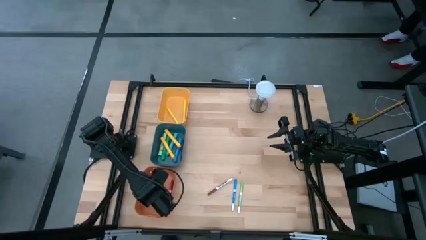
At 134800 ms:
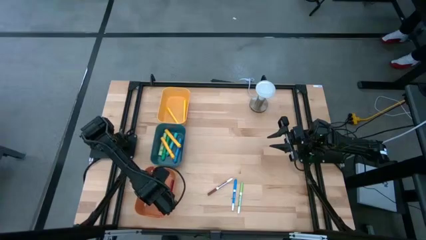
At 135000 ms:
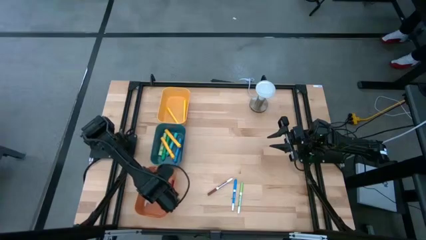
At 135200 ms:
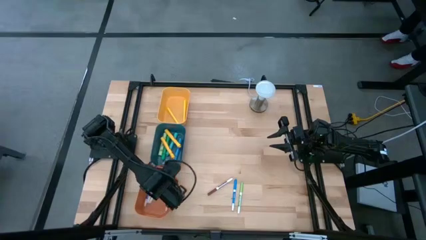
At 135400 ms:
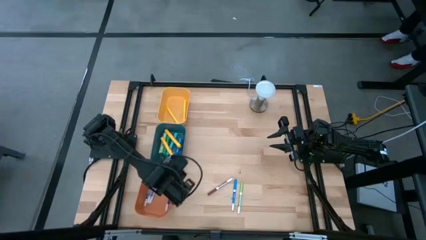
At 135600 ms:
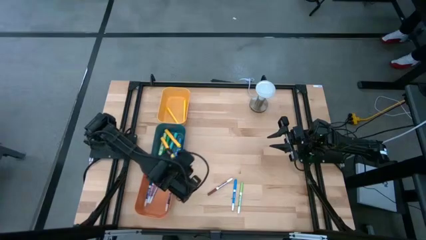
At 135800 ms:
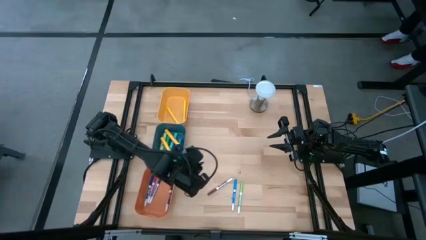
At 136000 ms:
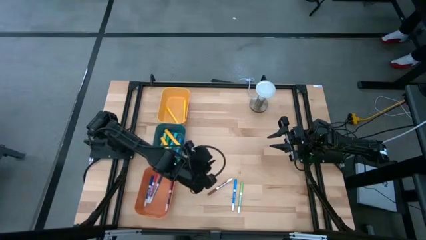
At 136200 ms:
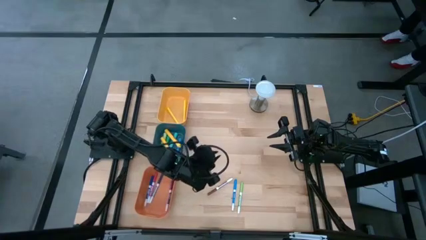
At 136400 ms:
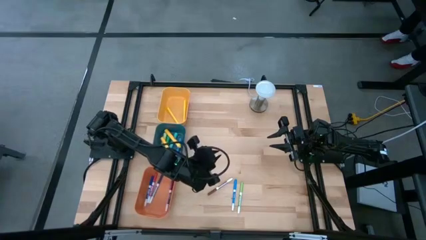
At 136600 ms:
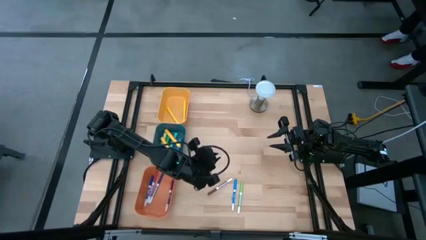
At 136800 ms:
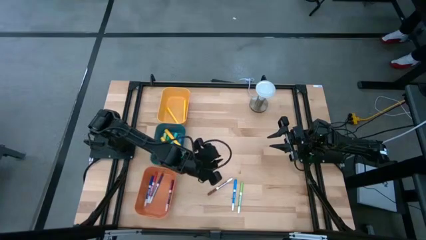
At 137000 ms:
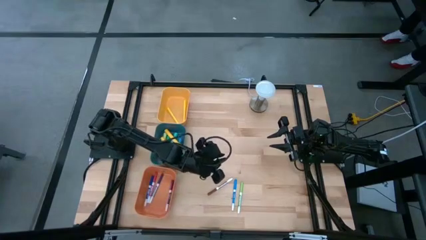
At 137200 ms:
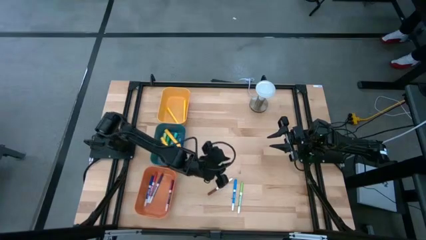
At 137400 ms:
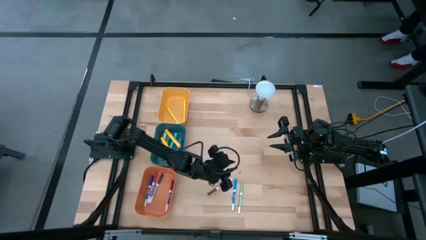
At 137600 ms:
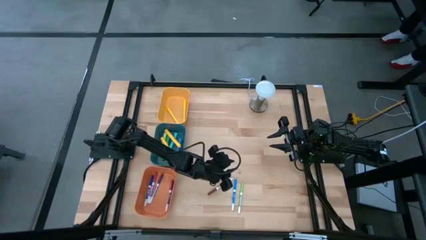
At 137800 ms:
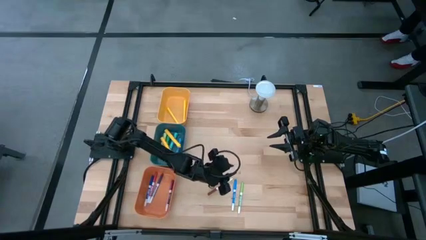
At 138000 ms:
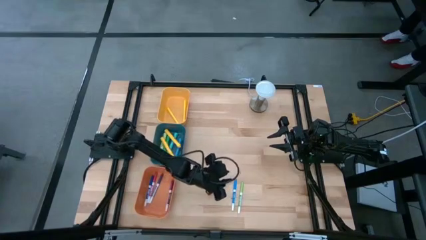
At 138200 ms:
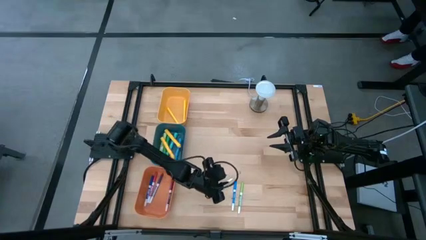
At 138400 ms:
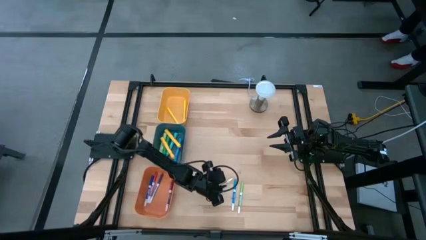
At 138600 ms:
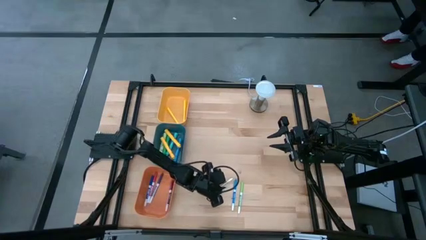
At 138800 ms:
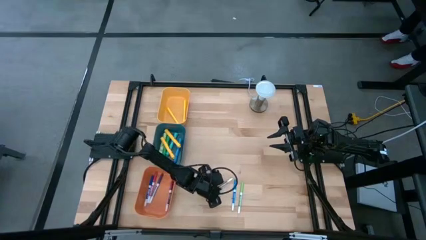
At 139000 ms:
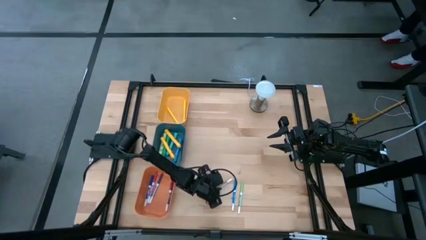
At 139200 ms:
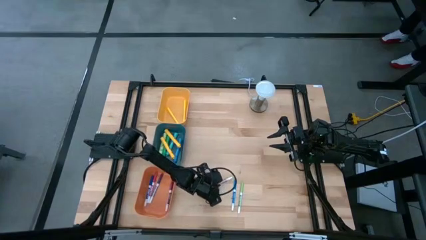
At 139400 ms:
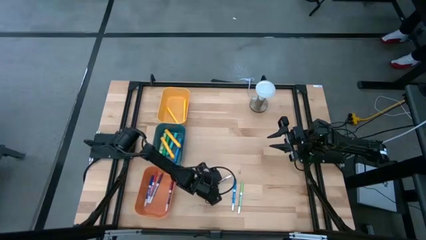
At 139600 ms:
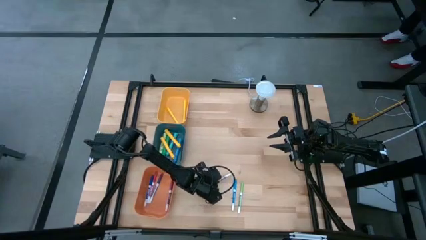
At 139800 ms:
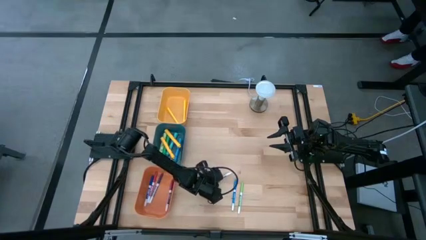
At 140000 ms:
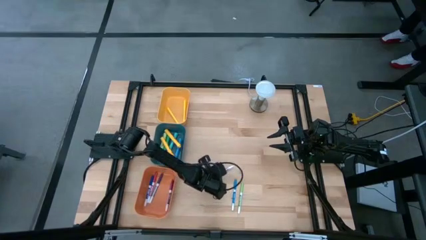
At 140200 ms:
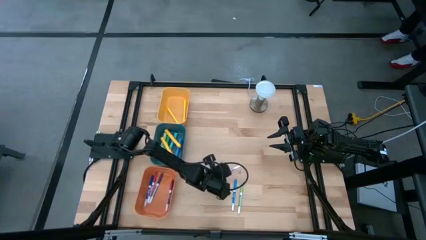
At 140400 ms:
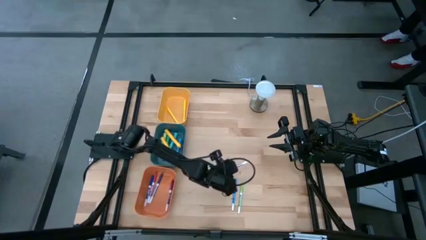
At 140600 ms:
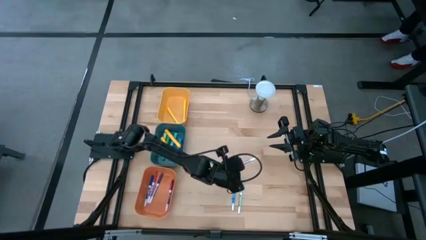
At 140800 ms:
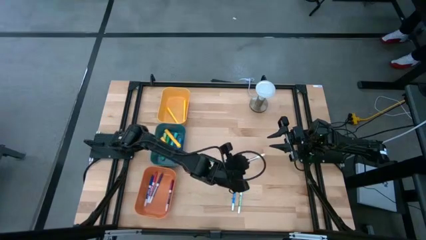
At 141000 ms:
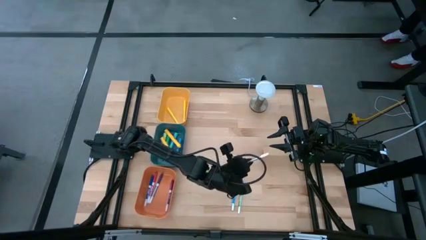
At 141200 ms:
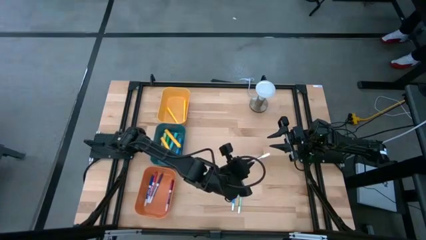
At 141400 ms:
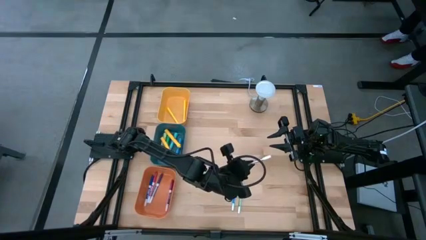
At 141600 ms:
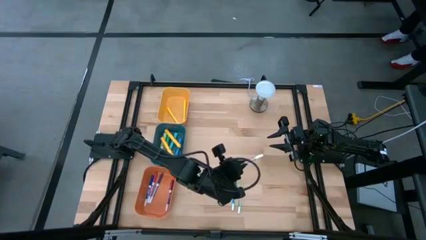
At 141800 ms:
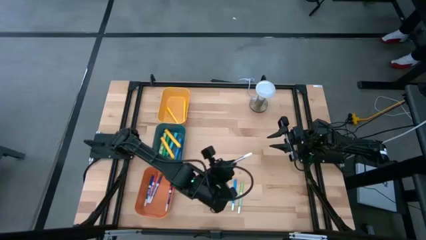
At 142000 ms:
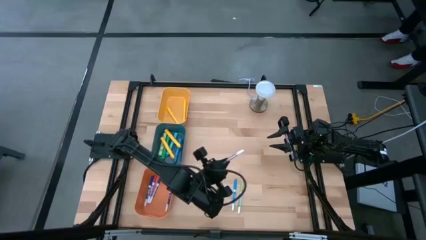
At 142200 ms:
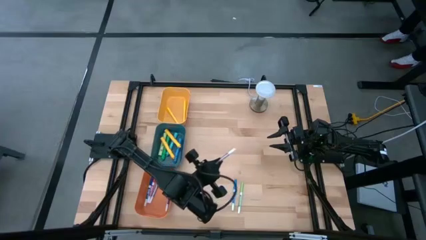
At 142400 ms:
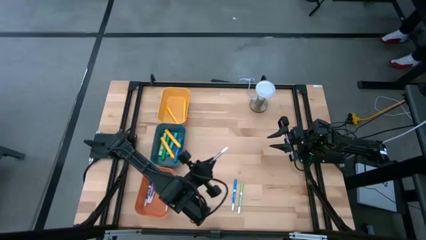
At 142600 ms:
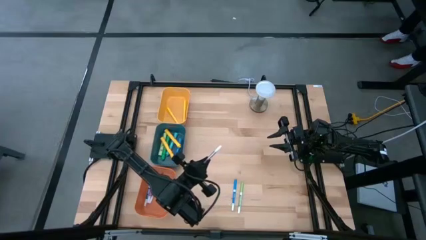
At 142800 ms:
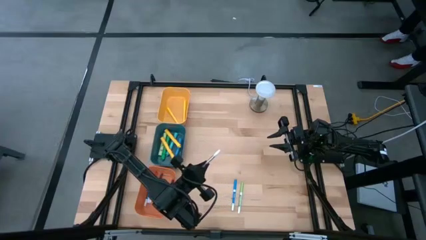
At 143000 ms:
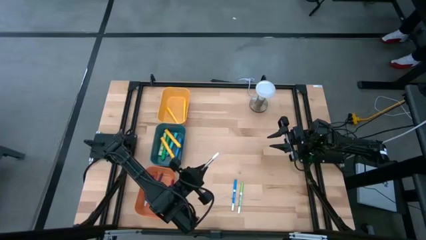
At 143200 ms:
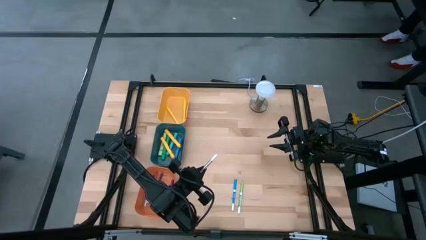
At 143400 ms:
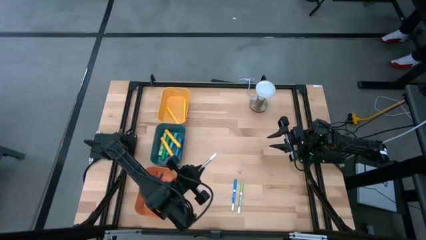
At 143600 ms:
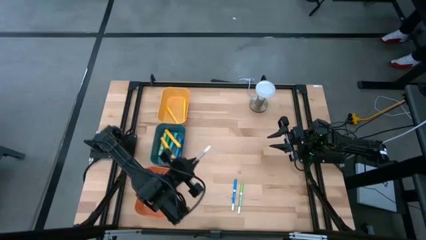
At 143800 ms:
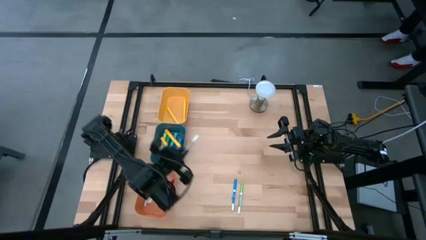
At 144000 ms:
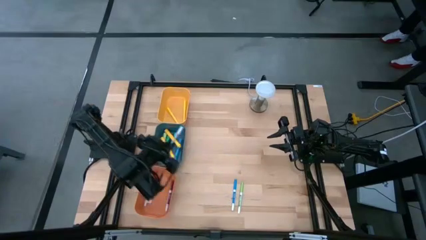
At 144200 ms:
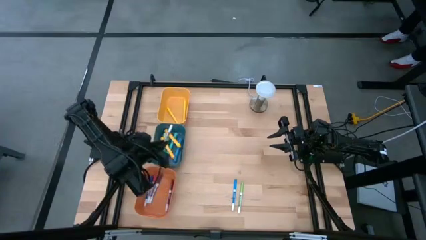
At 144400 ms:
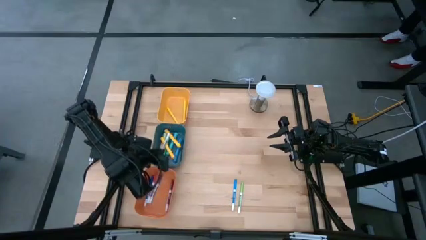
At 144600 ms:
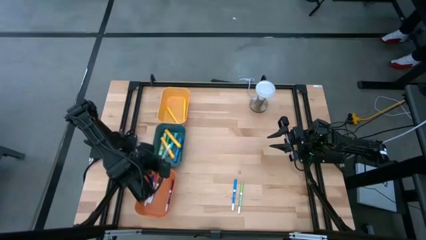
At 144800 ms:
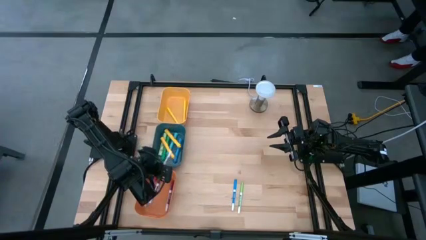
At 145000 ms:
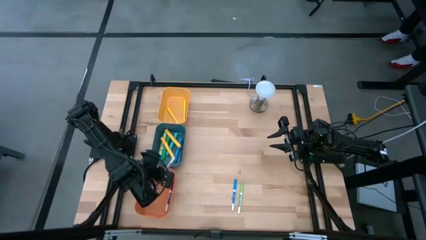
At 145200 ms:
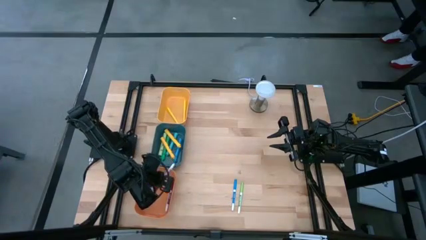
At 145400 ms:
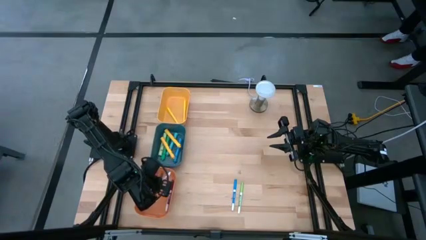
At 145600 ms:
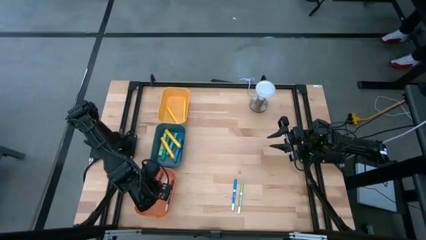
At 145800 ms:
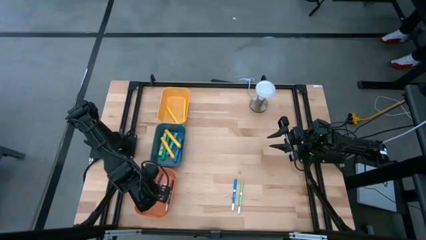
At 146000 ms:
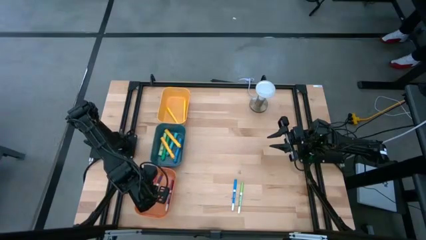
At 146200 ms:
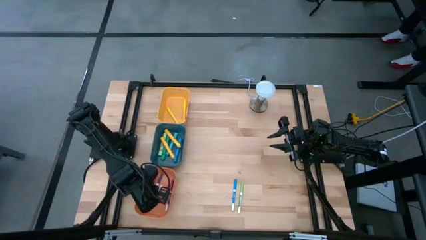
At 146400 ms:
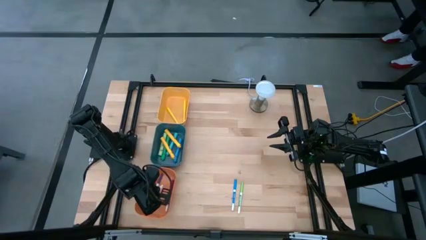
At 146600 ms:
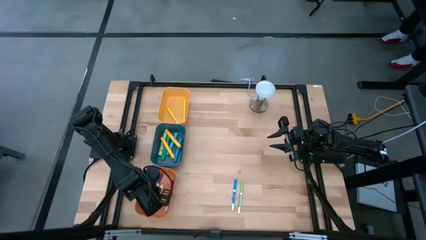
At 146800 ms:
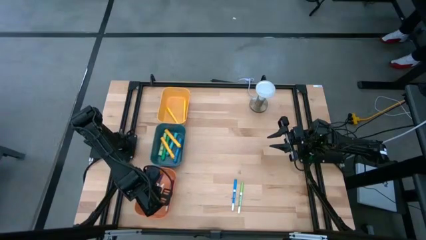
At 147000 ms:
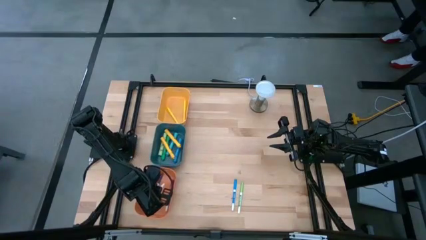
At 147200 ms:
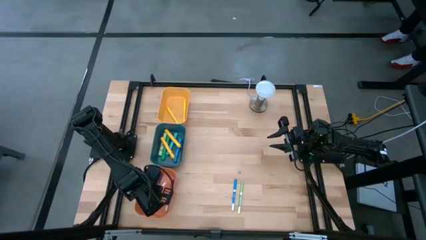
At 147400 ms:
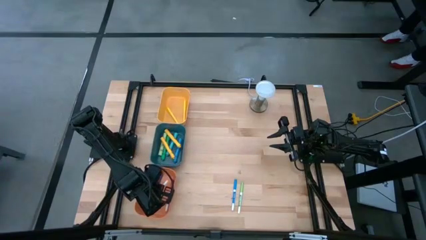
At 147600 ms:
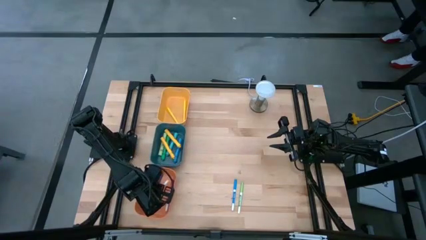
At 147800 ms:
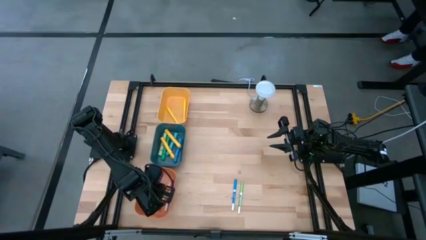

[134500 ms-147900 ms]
Task: Pick & Place Markers
Put the brown marker pen into the orange bin

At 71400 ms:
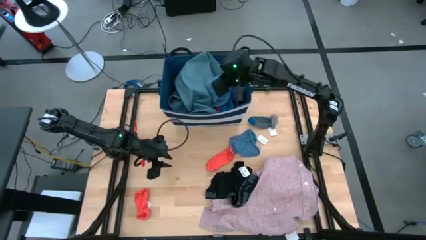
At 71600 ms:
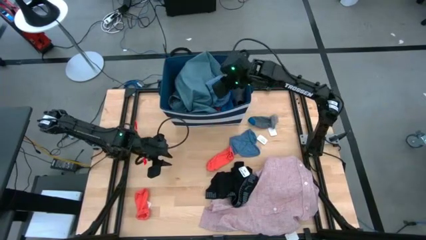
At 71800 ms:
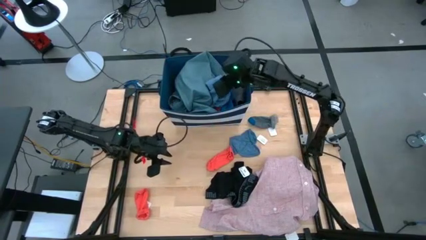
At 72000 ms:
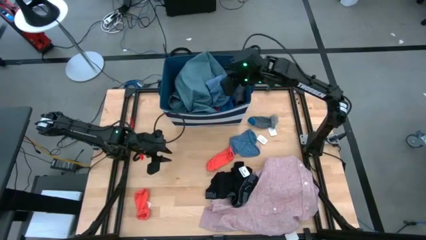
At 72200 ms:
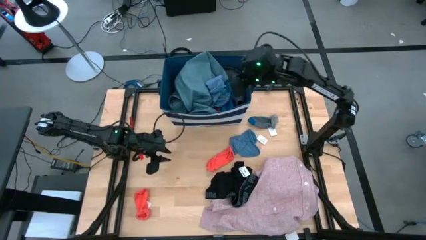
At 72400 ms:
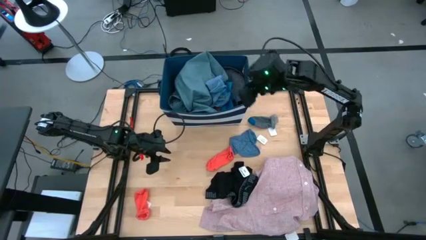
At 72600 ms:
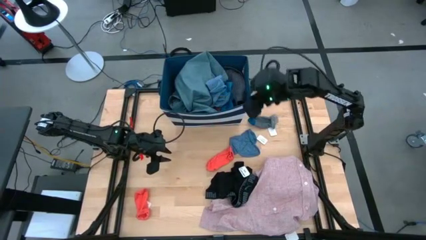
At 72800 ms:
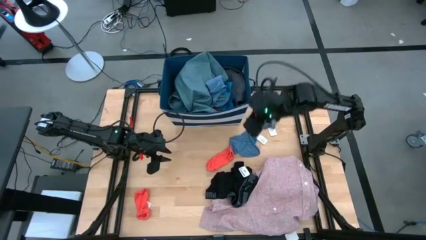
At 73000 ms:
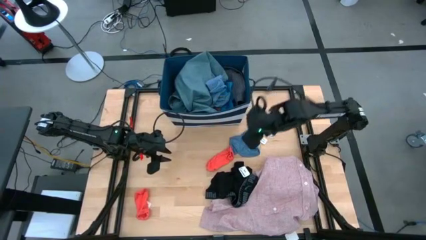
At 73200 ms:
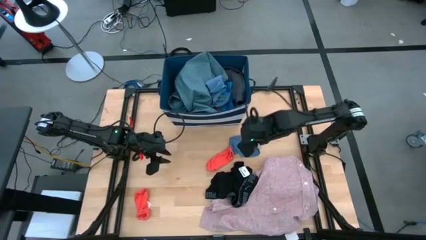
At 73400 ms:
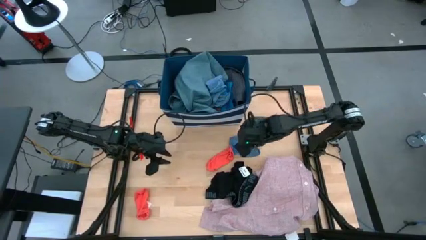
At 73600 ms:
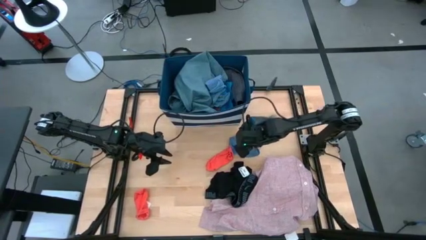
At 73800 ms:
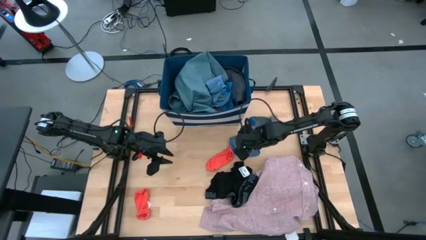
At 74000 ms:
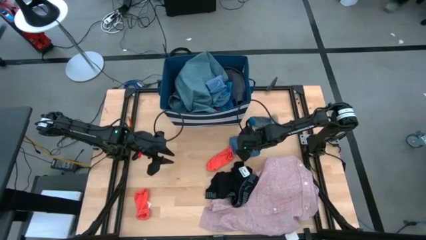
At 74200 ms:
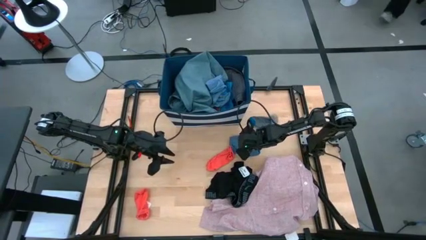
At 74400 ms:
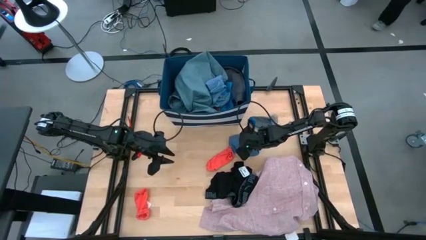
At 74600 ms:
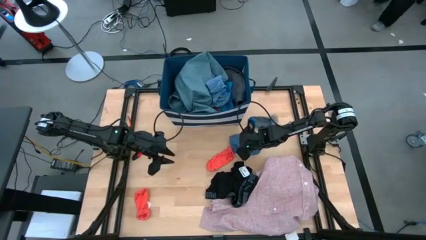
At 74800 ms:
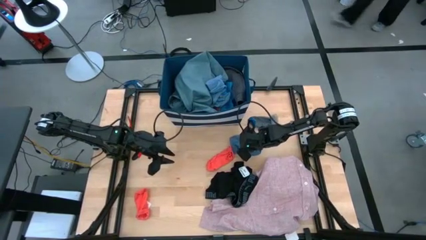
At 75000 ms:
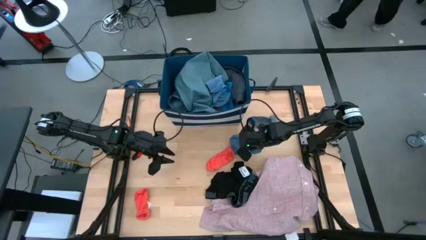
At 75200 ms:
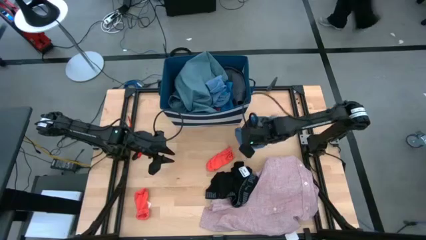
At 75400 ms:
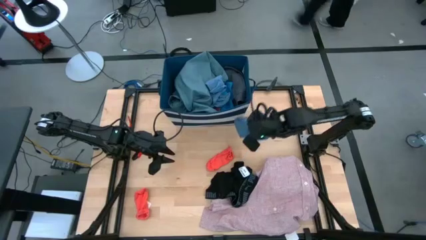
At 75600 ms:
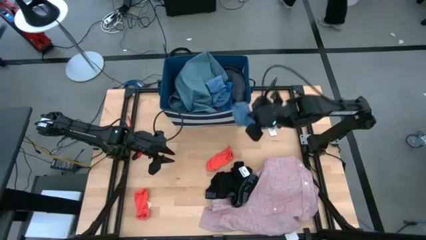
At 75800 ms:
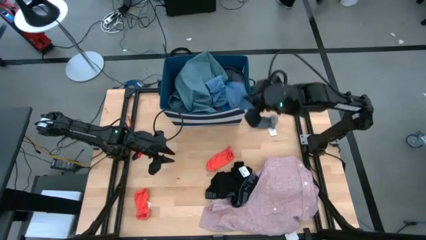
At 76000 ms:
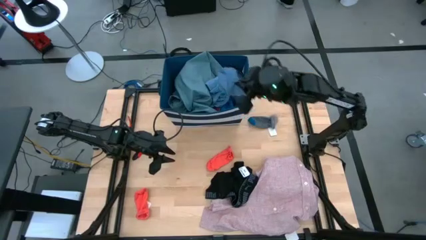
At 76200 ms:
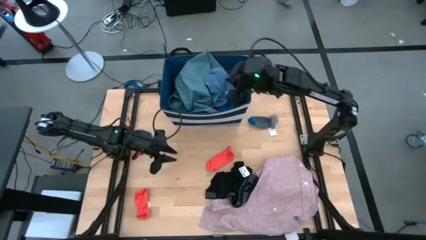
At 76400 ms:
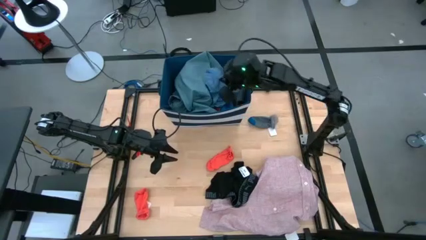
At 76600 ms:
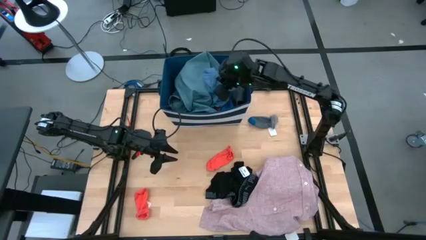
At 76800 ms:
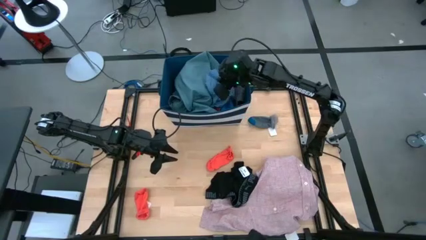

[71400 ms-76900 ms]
Task: Sort clothes
Put the blue sock into the blue bin
